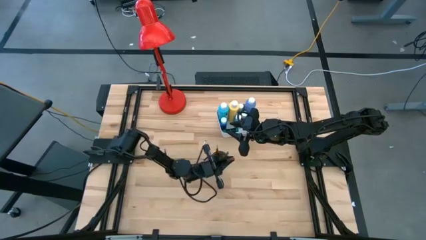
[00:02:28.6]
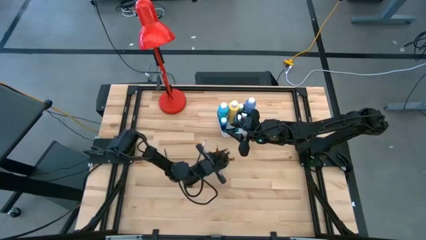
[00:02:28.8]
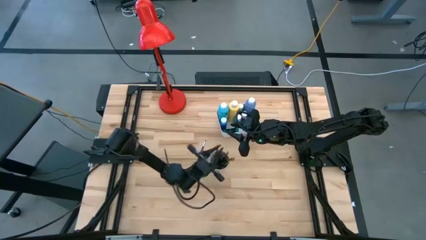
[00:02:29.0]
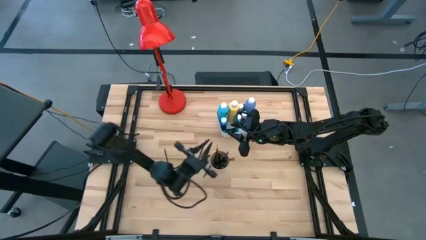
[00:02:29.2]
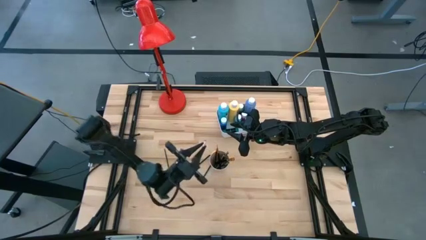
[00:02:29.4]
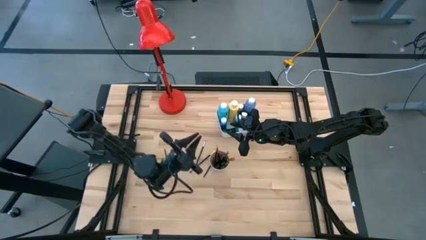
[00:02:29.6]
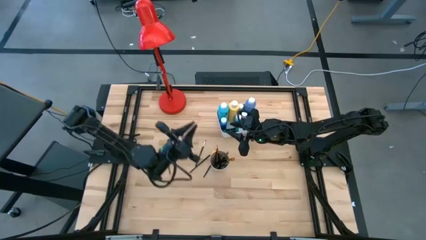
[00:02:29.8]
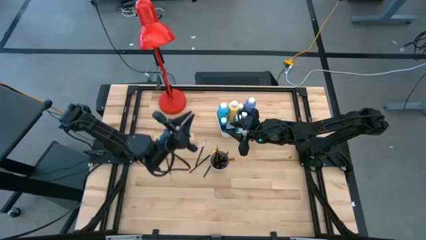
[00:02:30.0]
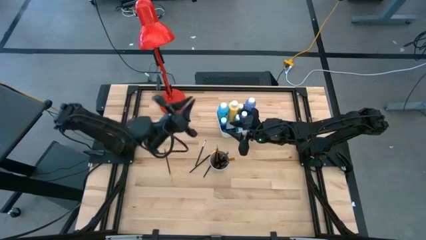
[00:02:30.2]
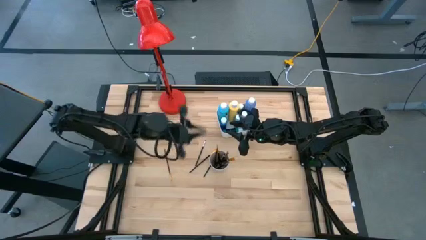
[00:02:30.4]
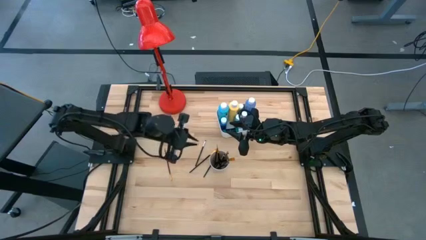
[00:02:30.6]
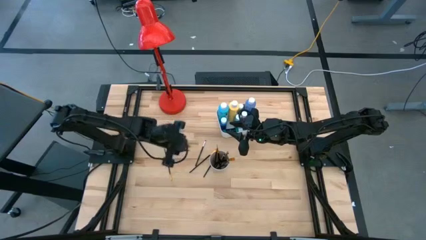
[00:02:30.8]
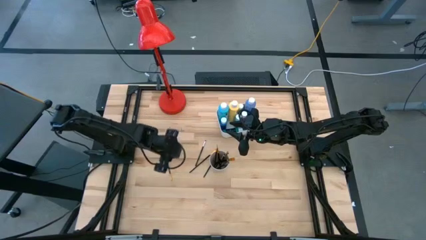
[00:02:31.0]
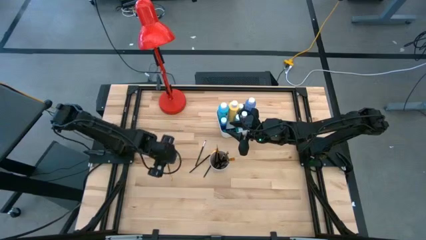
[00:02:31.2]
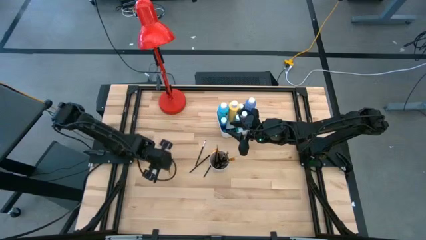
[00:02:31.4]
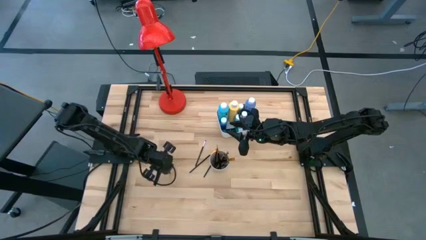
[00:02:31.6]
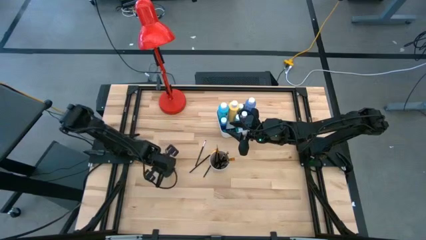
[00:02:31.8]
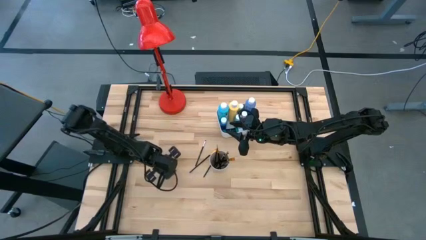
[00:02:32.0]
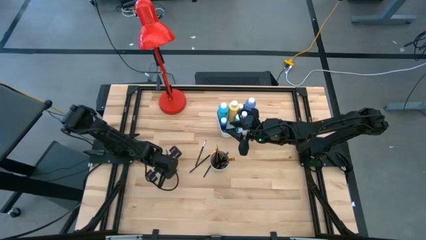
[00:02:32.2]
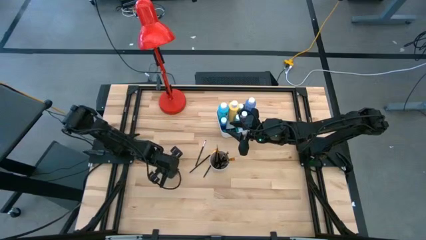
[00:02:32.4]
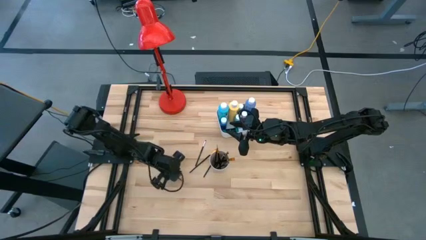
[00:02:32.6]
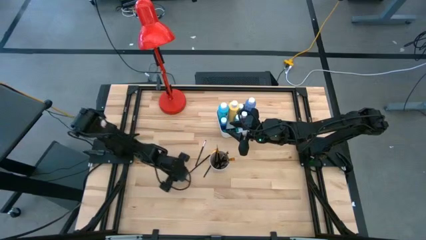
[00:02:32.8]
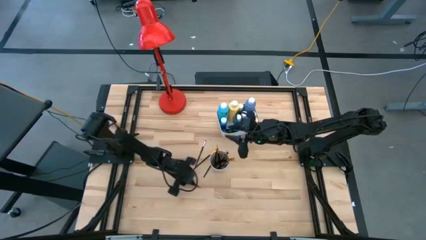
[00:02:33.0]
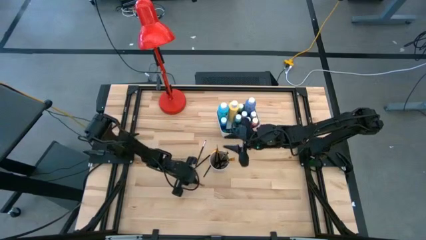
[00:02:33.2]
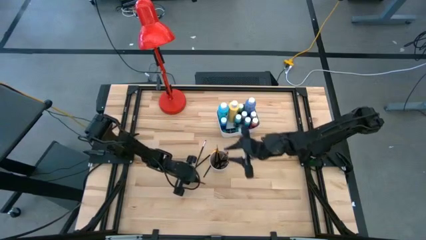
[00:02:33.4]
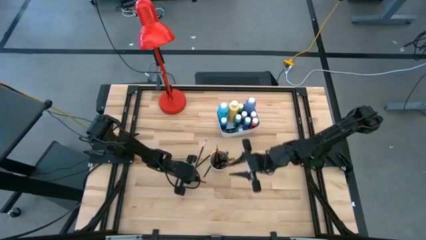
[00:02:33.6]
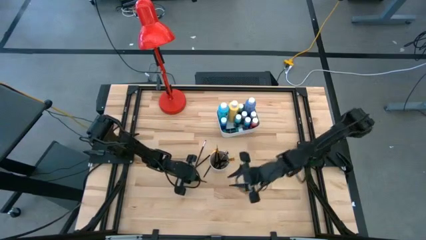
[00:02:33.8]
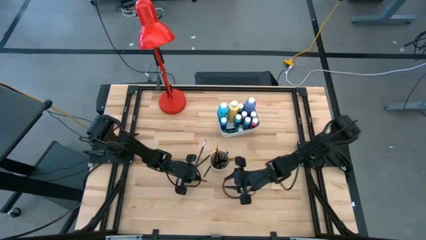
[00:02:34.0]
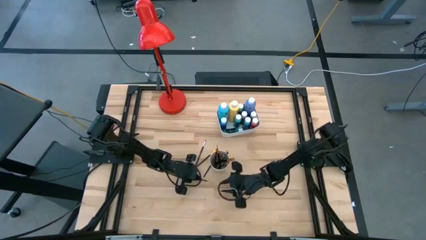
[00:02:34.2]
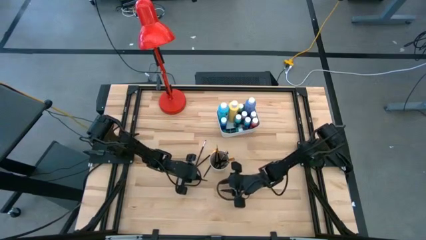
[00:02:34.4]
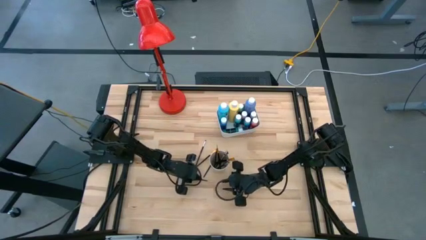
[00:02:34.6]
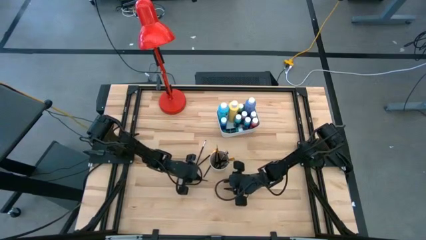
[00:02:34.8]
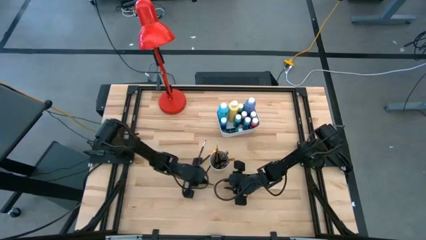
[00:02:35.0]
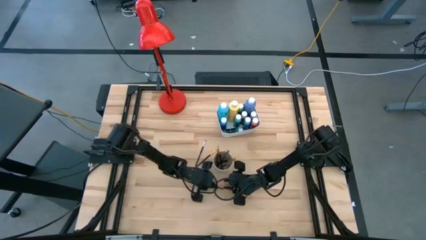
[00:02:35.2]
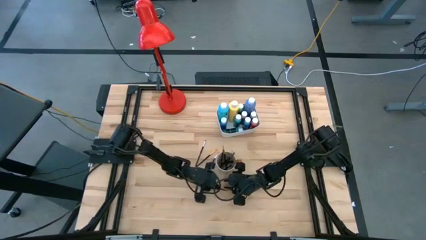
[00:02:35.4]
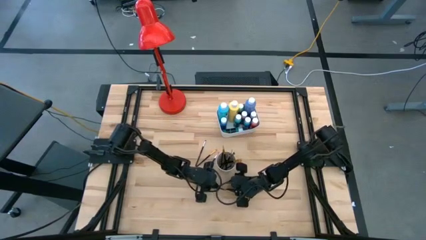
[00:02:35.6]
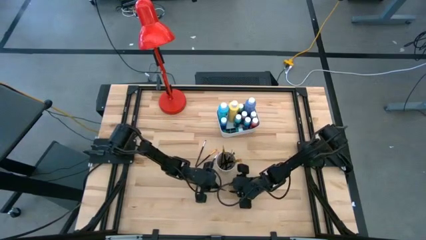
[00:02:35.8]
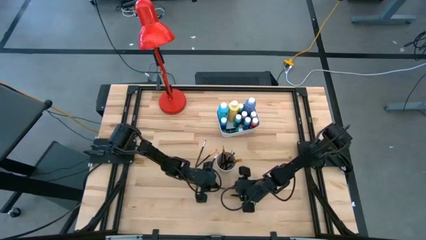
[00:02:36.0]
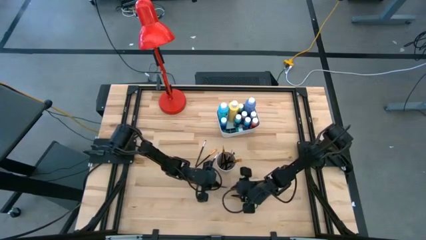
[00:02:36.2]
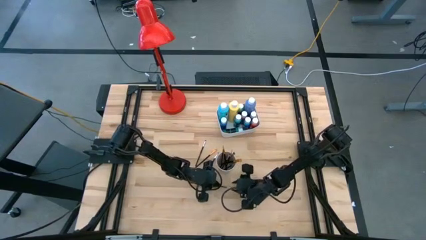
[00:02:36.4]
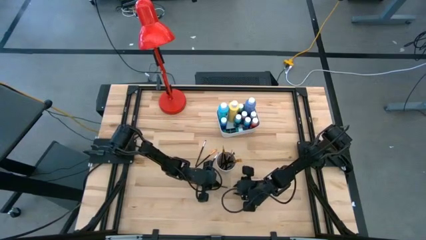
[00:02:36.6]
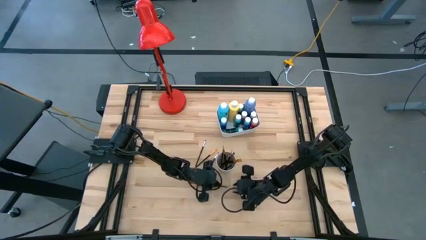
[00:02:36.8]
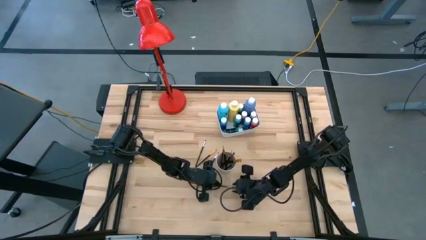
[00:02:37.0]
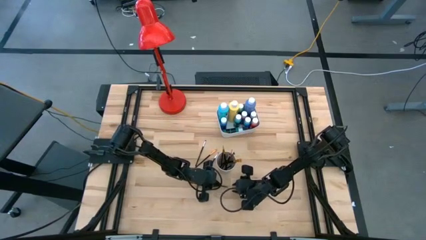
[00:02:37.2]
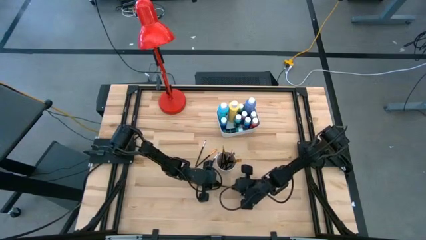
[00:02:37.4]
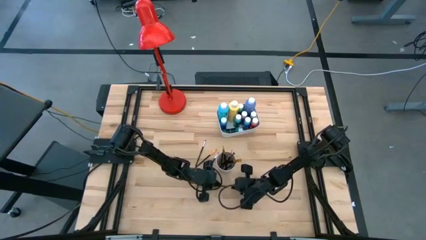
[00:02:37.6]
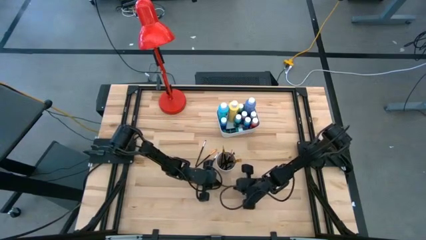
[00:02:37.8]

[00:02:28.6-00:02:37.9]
Task: Pick & Place Paint Supplies
Put the gold paint brush into the white cup

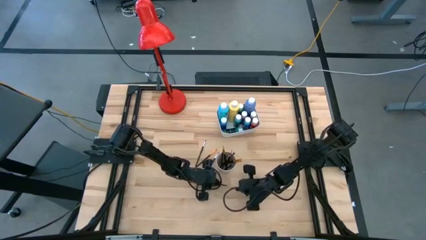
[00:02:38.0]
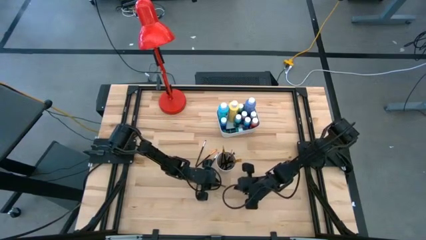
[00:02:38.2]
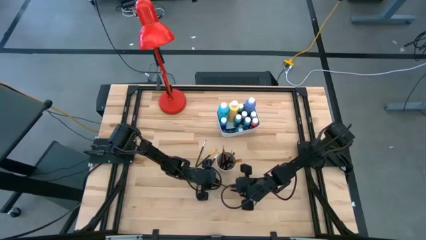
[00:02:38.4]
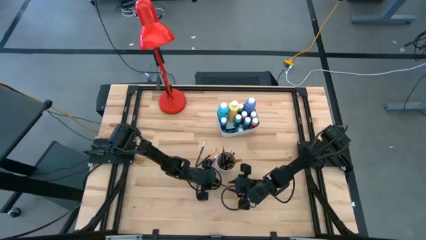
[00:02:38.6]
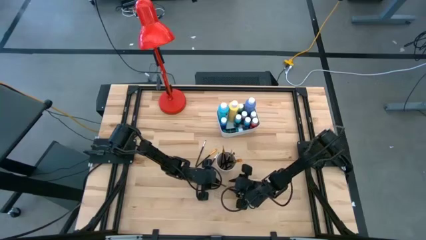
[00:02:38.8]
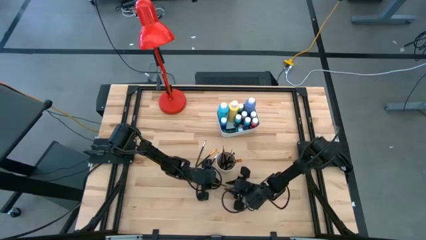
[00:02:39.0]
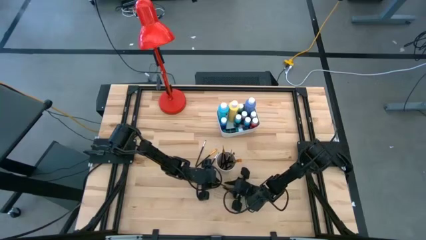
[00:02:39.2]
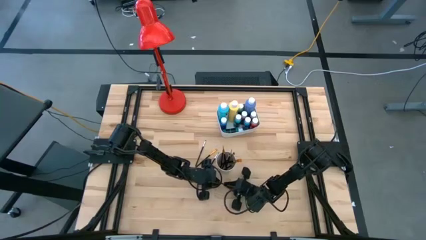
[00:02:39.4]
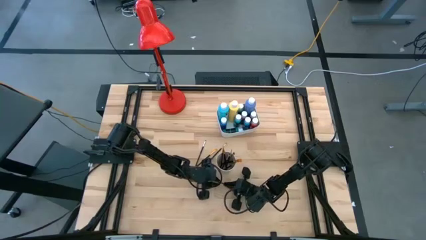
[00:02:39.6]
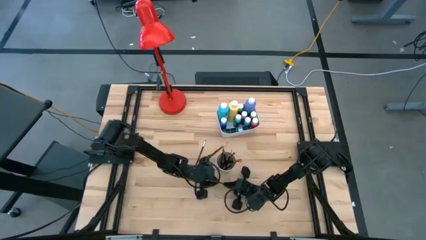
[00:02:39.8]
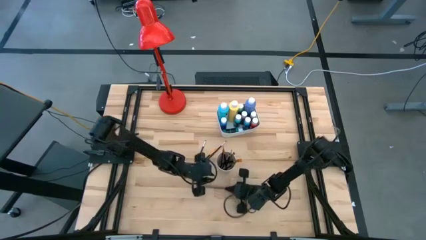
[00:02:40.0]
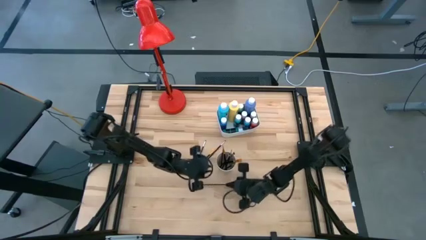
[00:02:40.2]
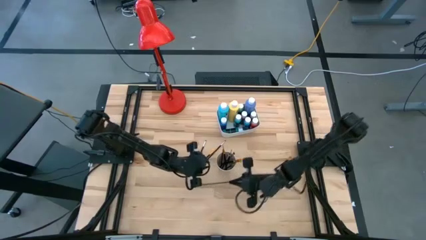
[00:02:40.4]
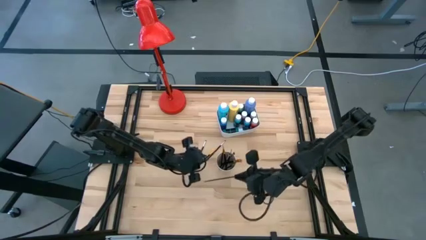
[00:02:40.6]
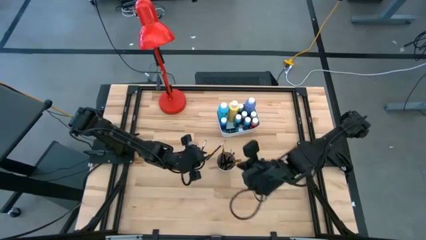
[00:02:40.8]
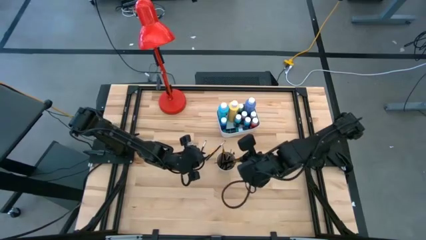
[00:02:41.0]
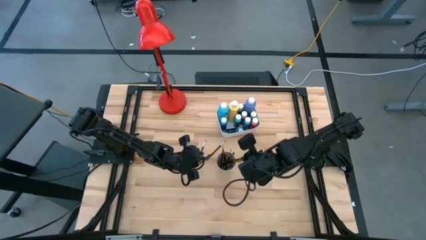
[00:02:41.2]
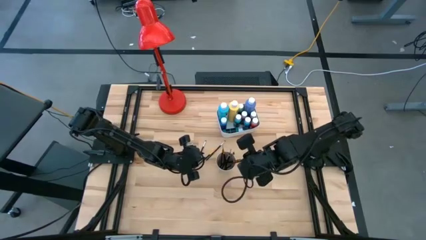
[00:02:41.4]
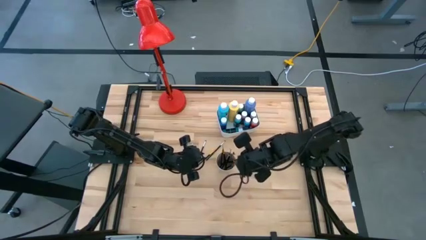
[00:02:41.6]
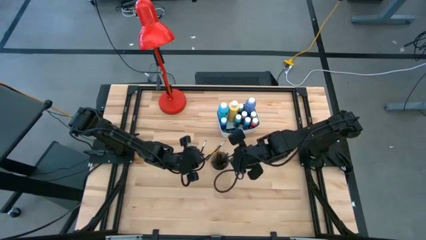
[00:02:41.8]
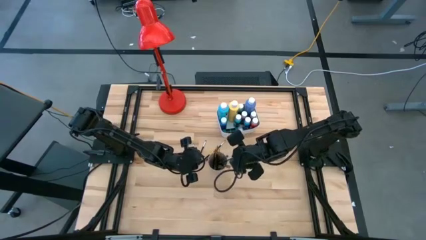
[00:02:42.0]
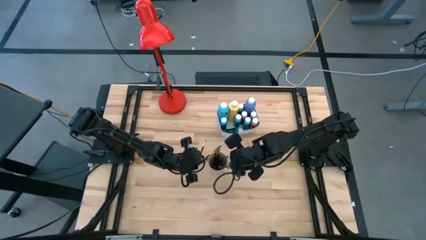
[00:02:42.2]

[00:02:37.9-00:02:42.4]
Put the gold paint brush into the white cup

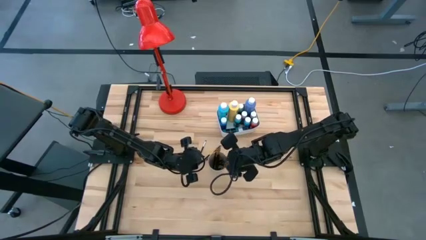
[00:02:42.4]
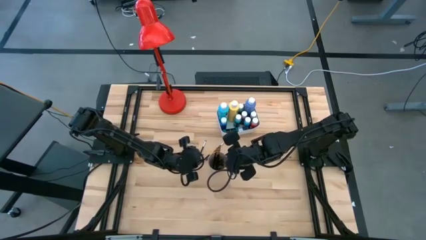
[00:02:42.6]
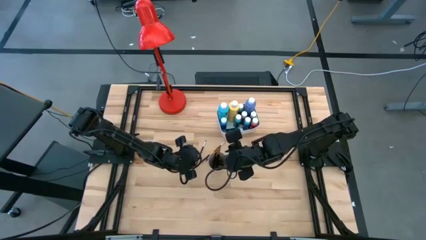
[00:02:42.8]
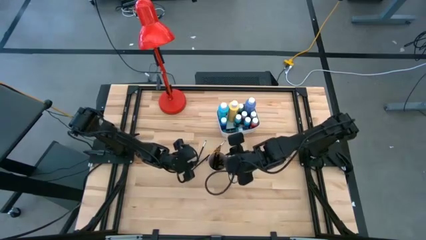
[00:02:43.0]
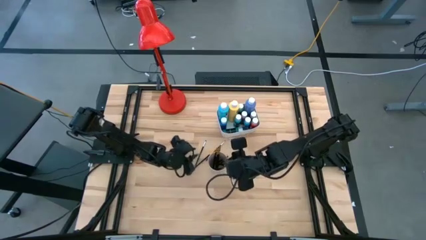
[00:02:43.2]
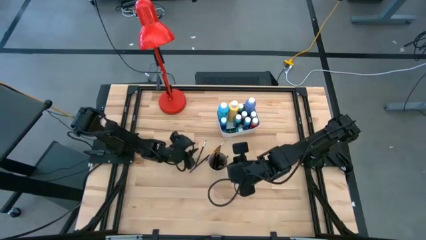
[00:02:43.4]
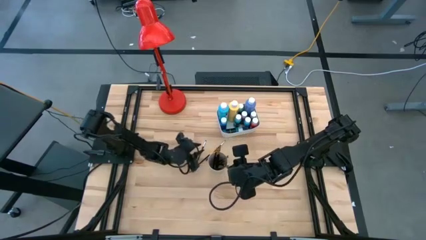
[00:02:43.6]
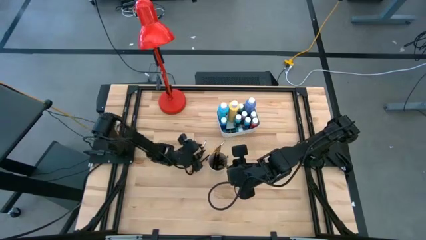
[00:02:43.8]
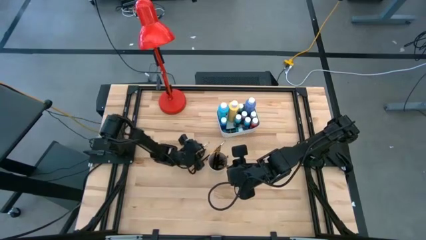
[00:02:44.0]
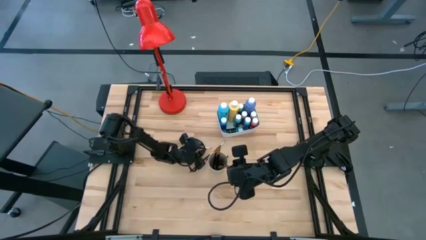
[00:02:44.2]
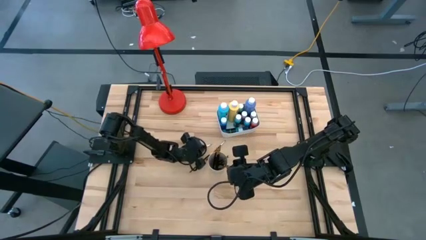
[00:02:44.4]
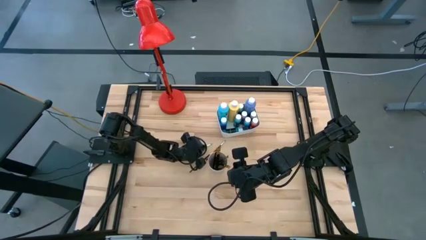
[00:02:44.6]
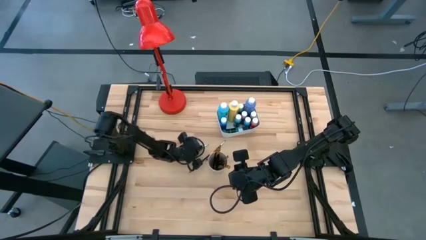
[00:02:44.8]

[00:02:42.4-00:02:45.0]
Put the silver paint brush into the white cup
